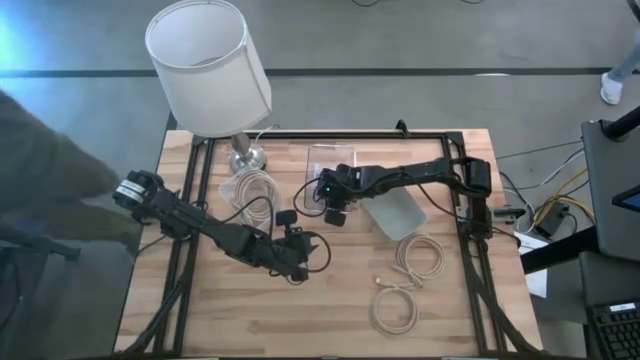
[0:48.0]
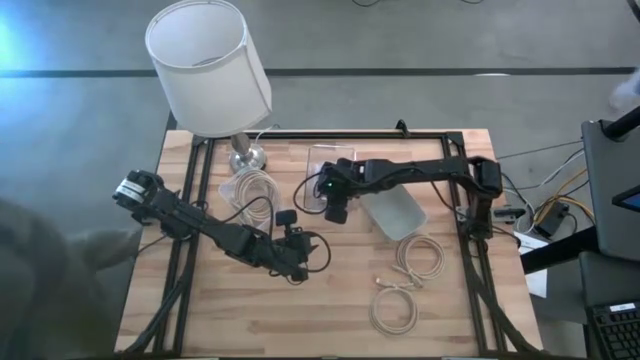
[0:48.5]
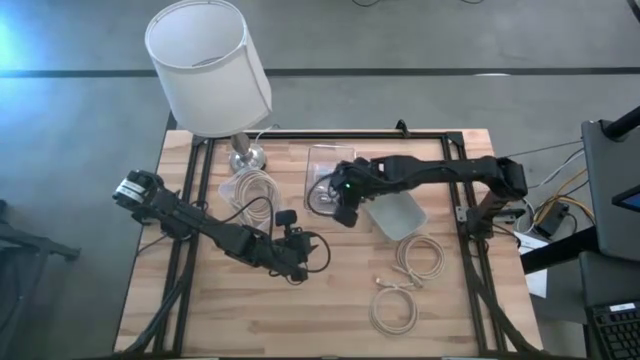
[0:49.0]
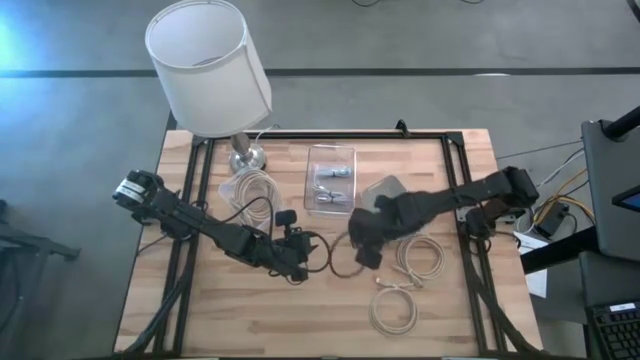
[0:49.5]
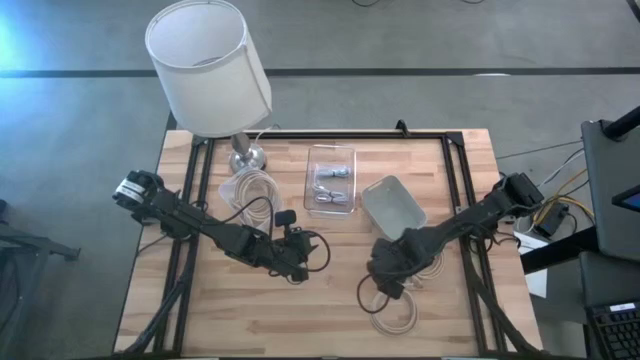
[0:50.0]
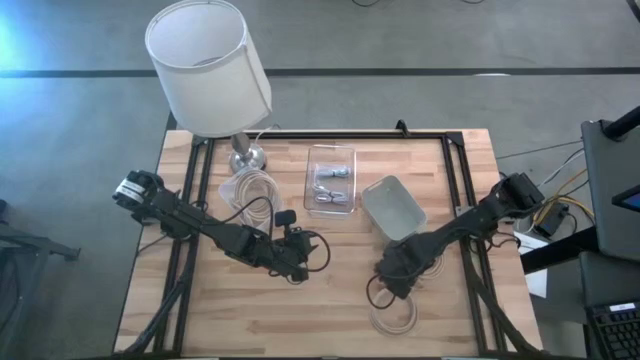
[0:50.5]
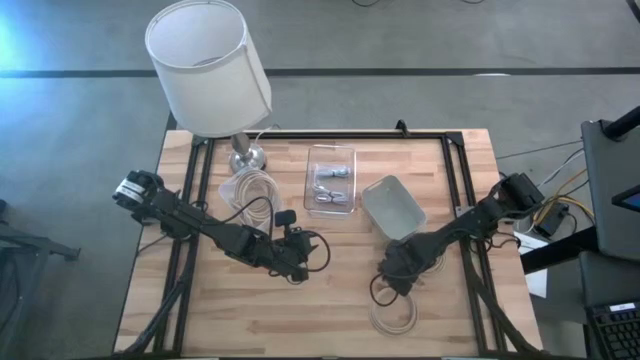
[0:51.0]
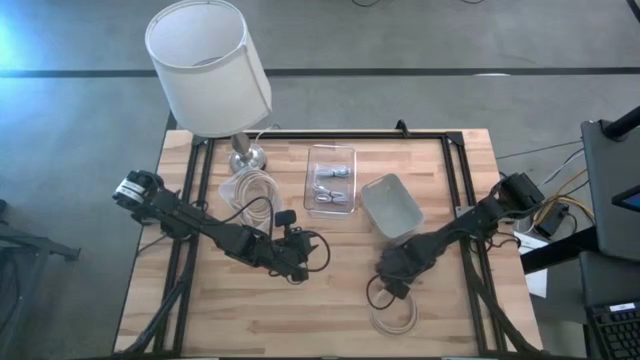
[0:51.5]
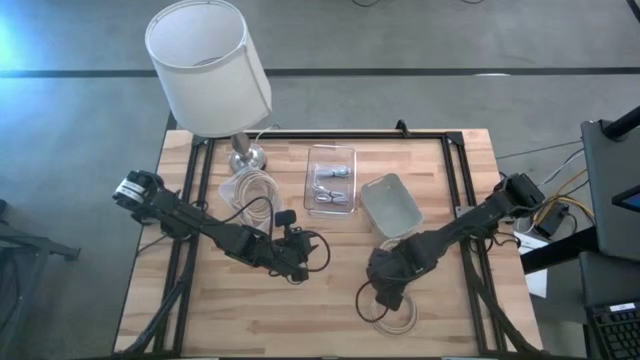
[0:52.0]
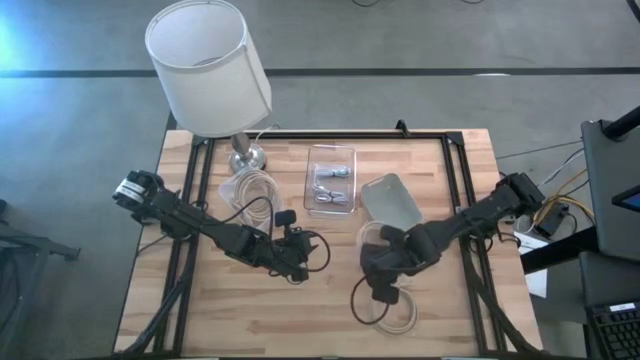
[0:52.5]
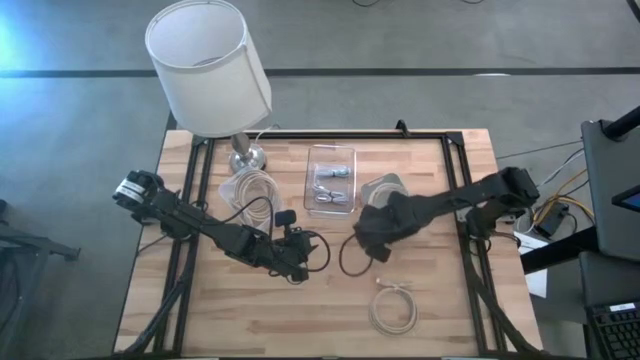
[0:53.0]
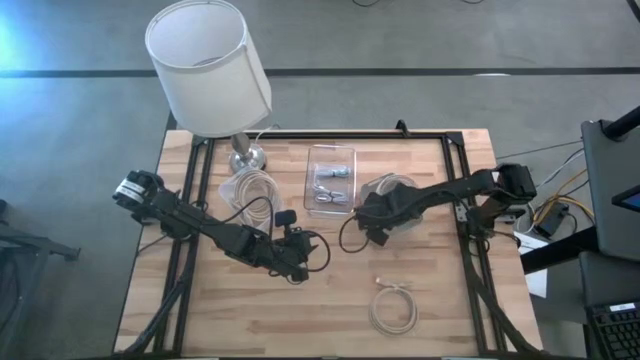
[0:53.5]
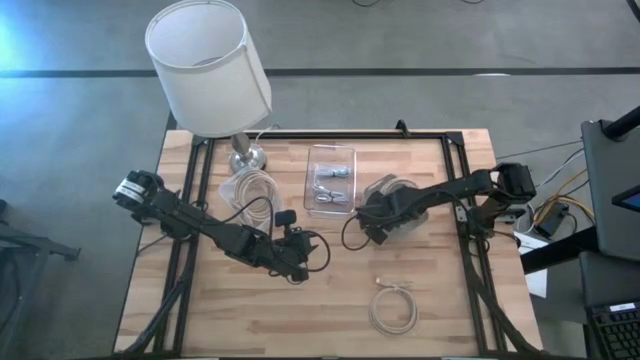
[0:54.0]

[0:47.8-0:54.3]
Task: Pick & Place USB Port
Put the brown HDMI cable into the brown bin

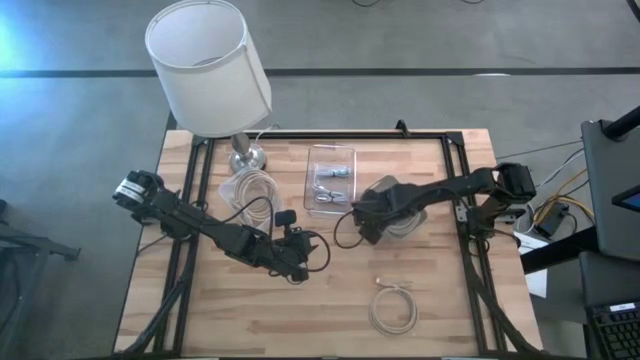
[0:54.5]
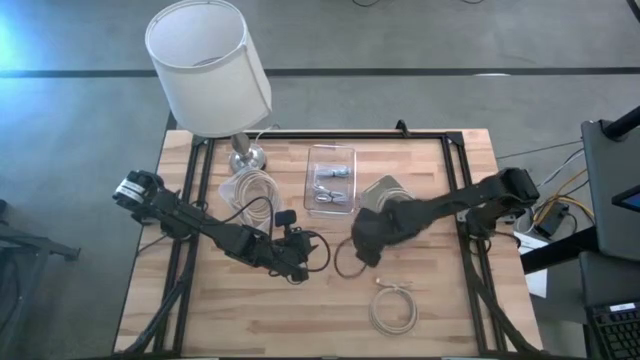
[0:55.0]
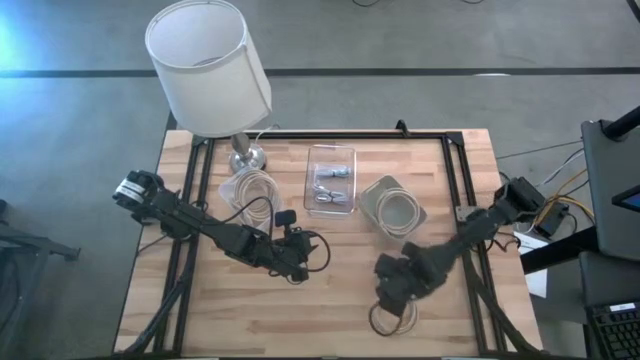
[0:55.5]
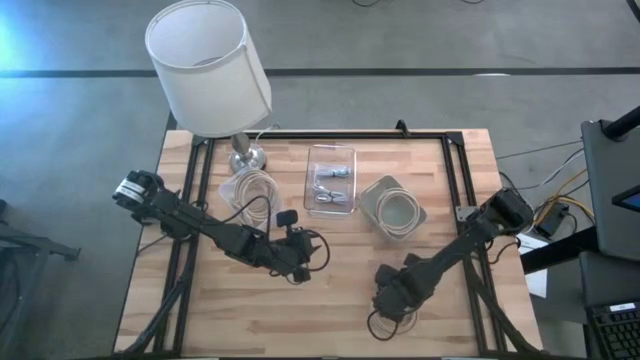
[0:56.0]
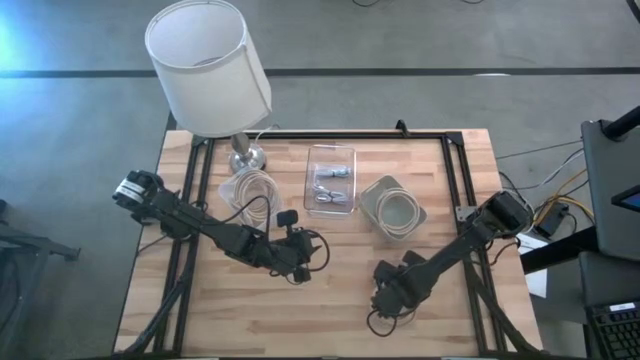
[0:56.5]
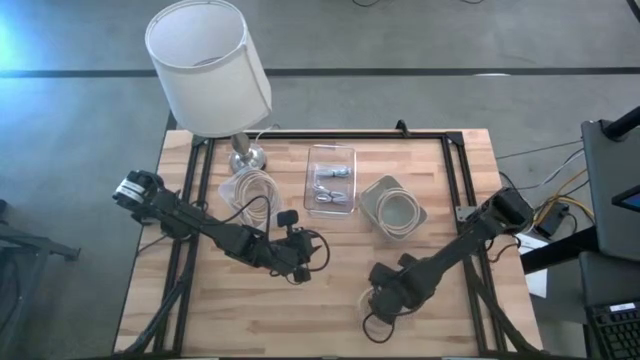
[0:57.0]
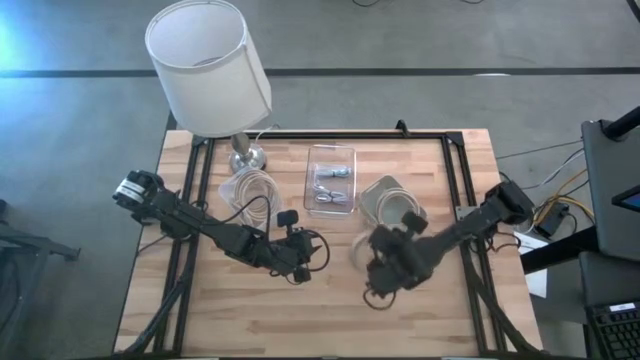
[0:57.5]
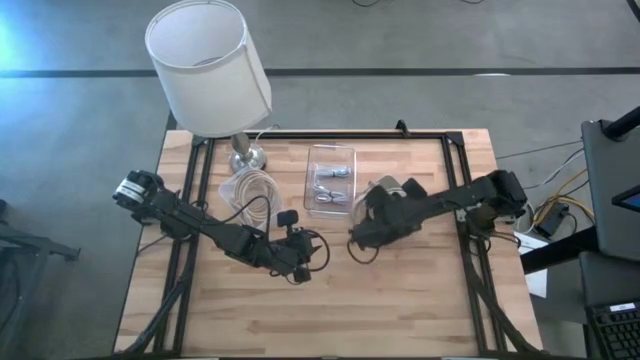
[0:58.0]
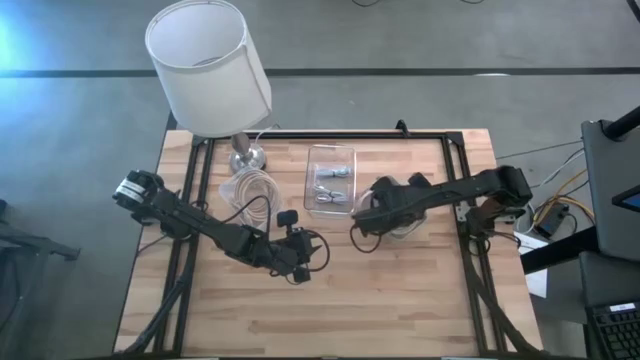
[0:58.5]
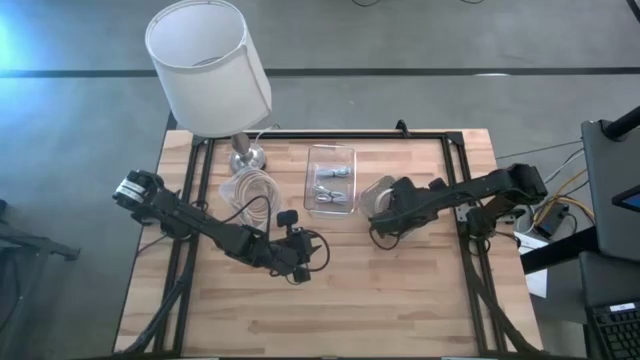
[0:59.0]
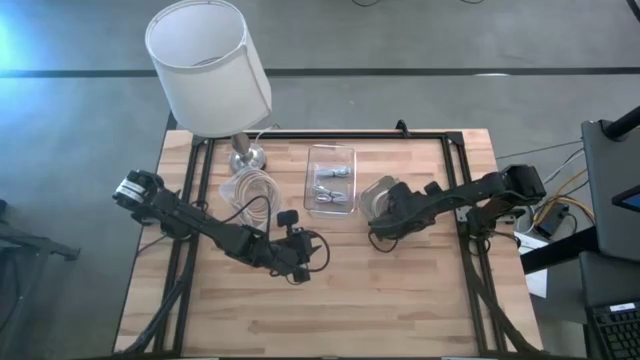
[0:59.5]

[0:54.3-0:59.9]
Put the brown HDMI cable into the brown bin

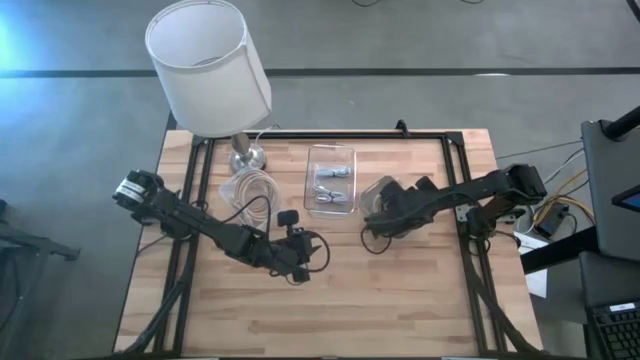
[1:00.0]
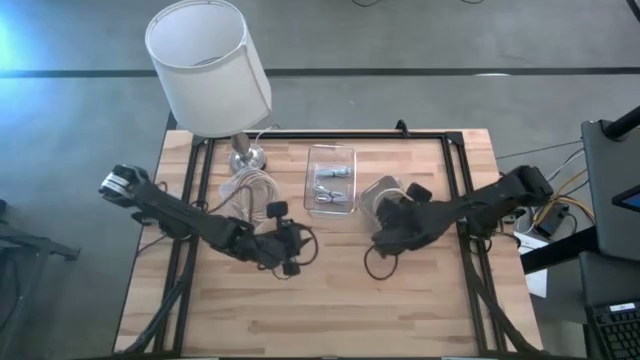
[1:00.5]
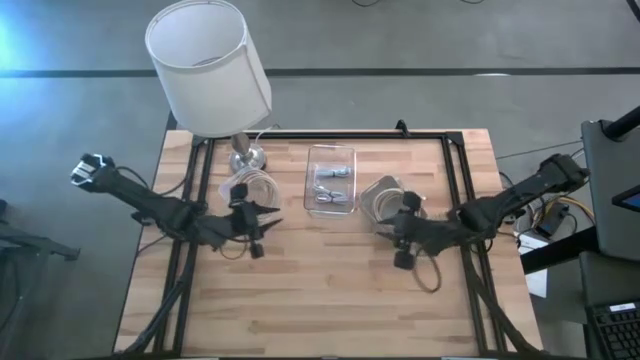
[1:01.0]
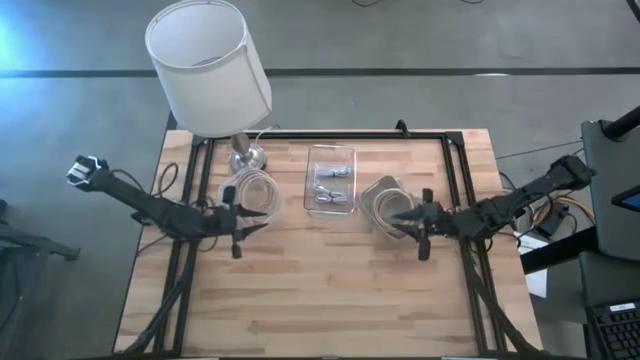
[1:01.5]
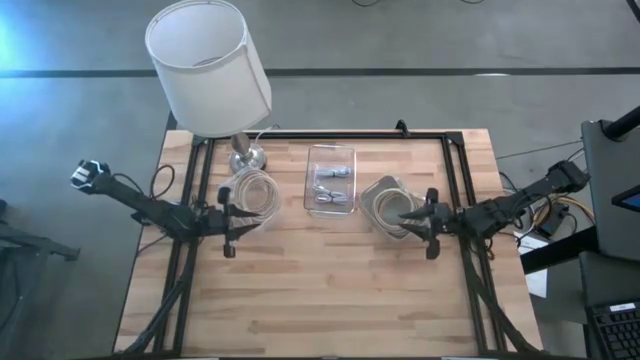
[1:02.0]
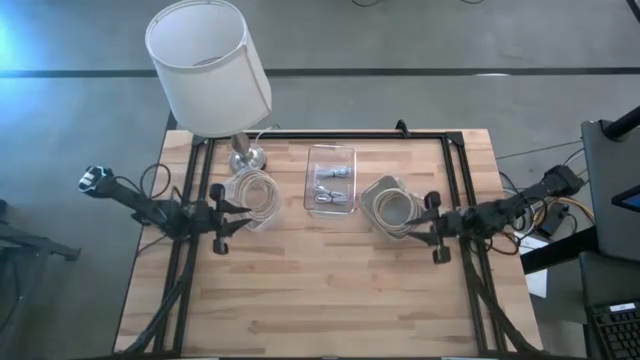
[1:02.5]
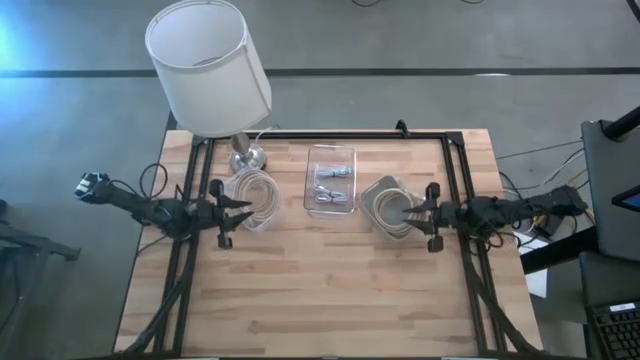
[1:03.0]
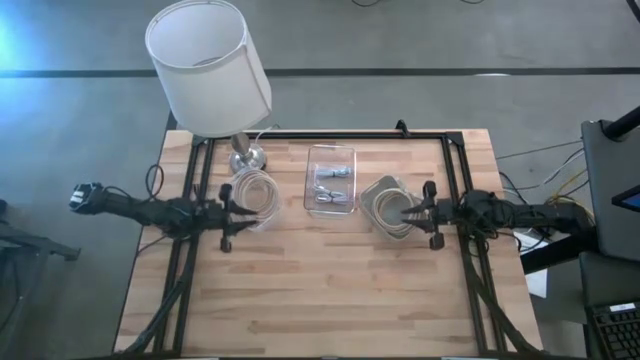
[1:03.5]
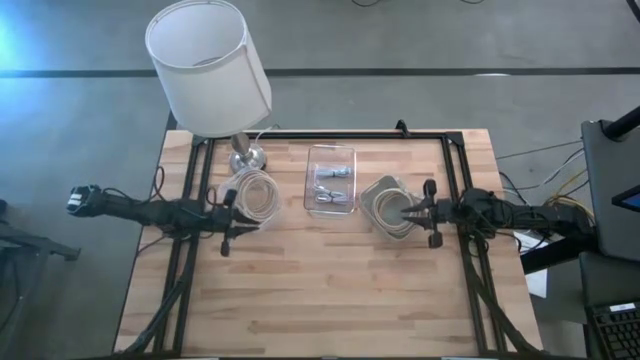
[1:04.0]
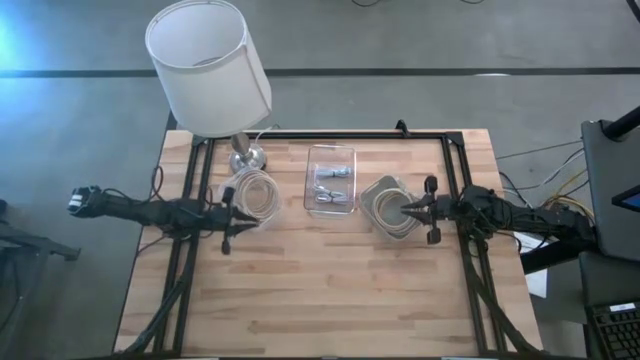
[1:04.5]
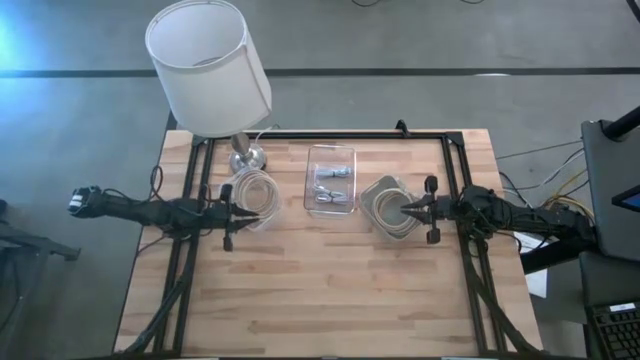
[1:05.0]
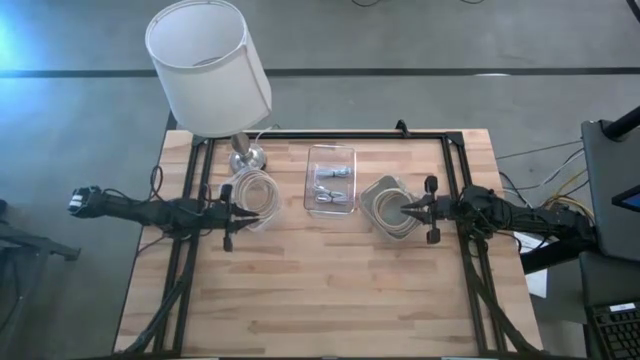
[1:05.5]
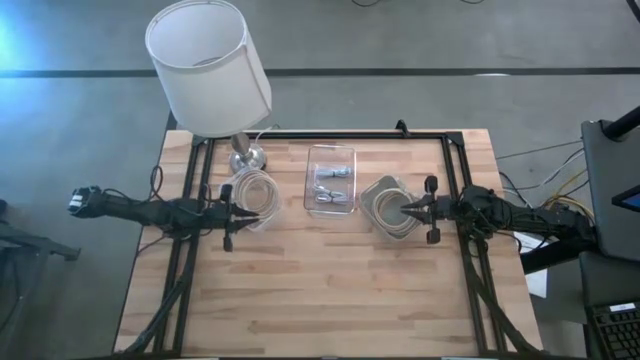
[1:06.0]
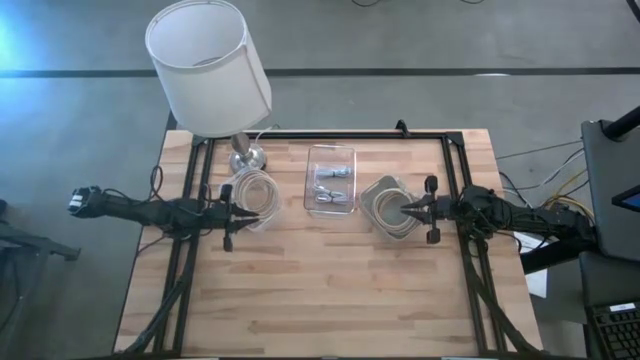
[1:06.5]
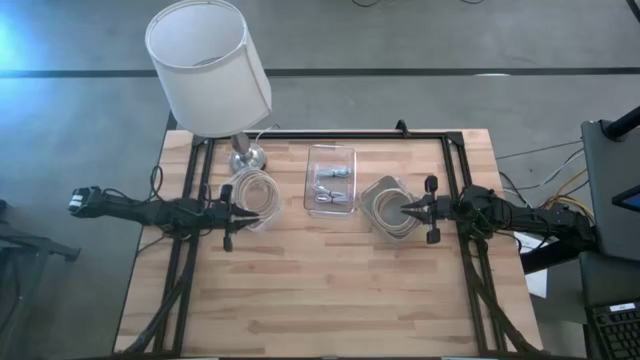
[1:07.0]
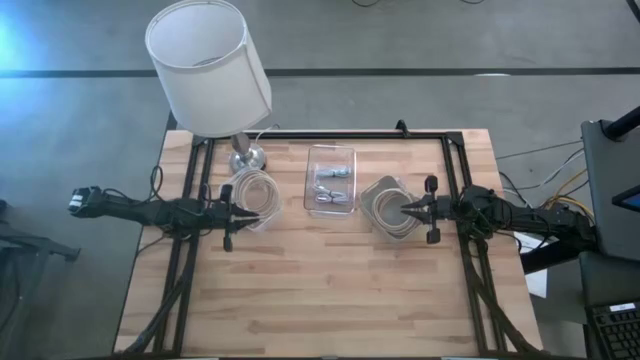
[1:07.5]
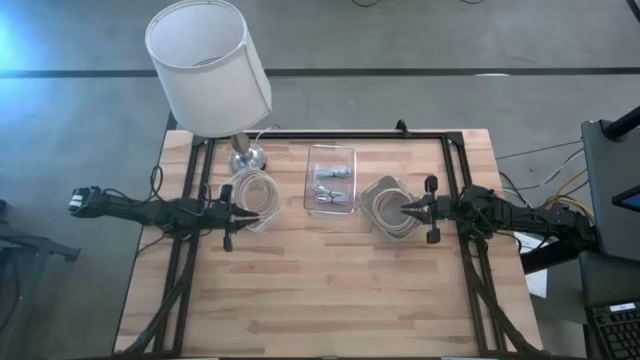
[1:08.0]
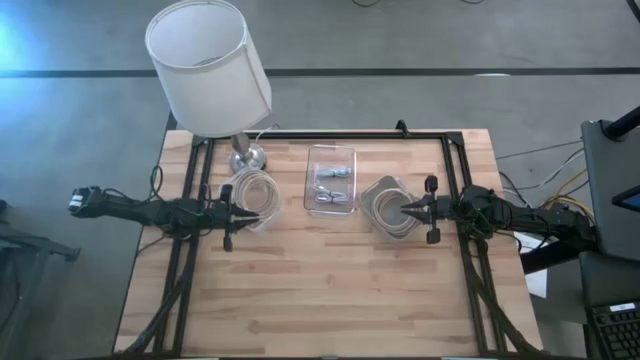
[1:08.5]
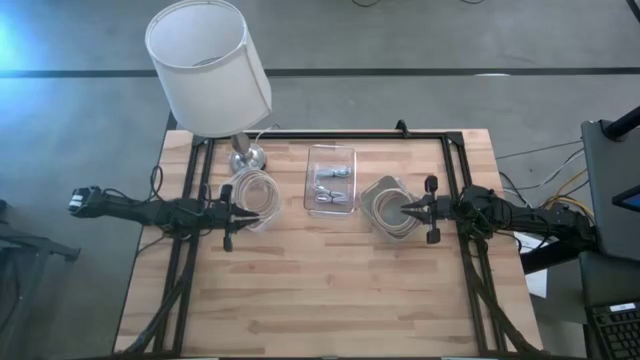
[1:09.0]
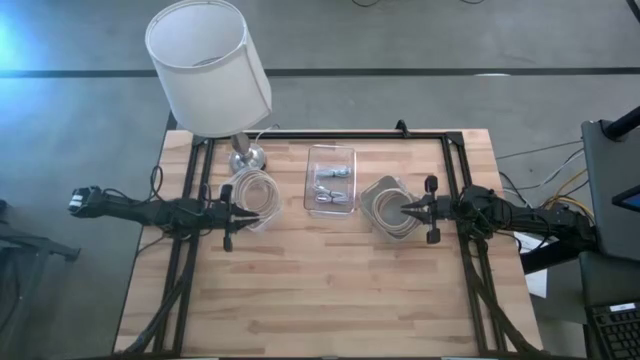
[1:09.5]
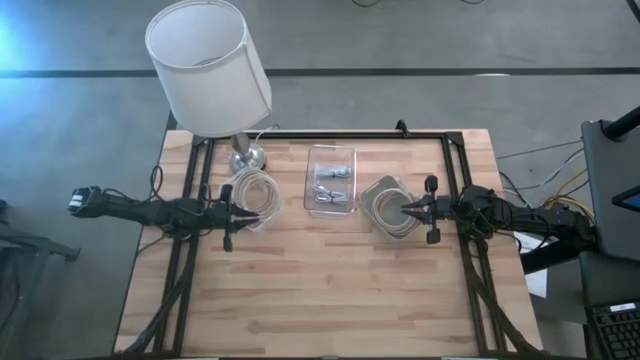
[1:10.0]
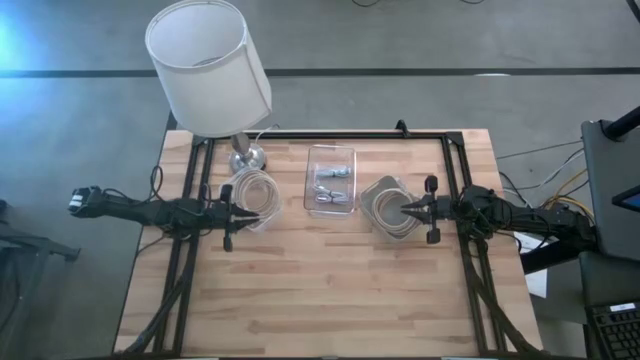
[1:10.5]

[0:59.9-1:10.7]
Return to Home Position
